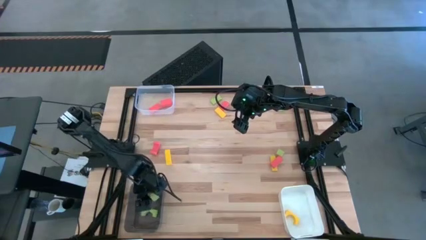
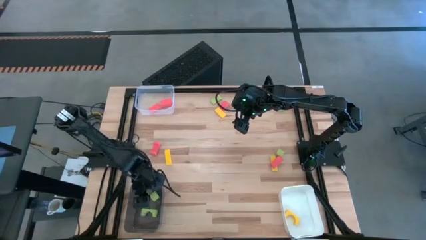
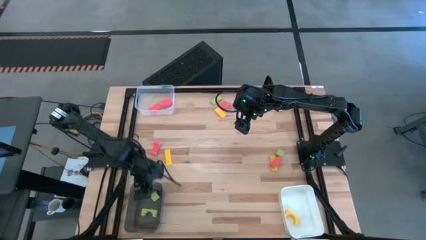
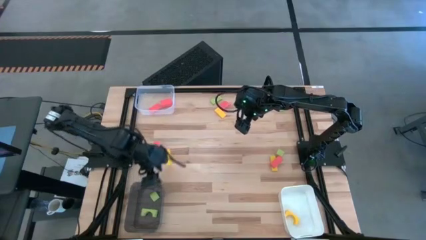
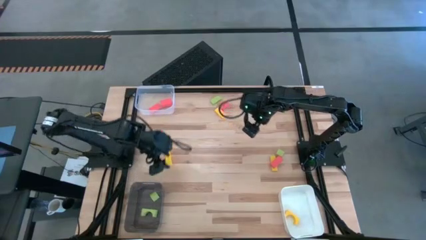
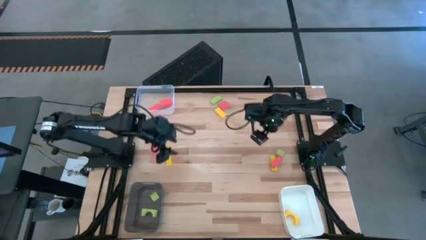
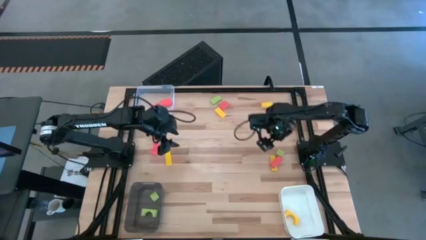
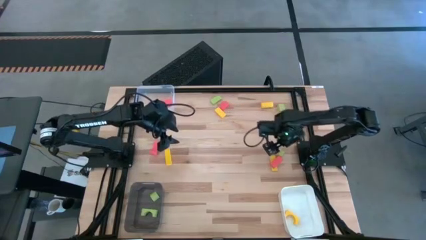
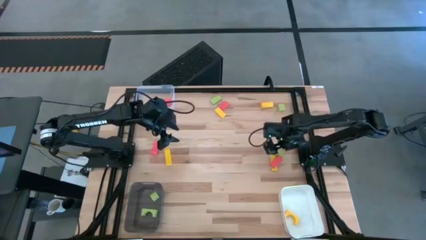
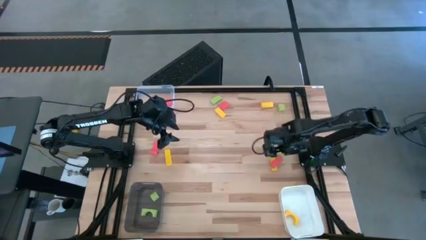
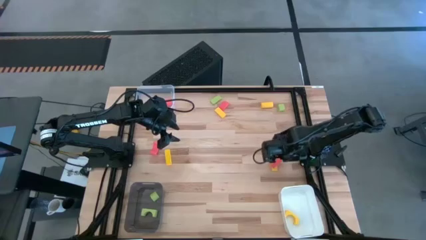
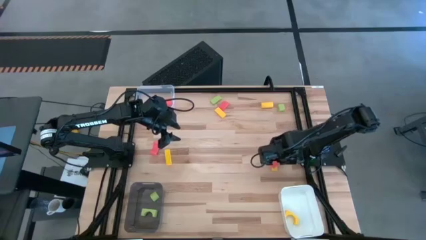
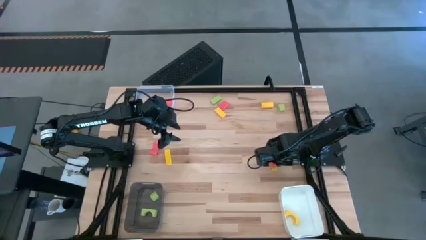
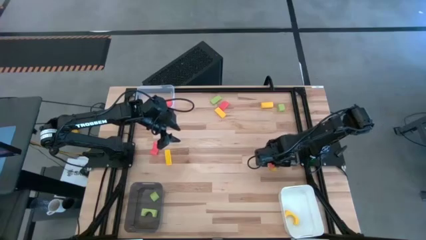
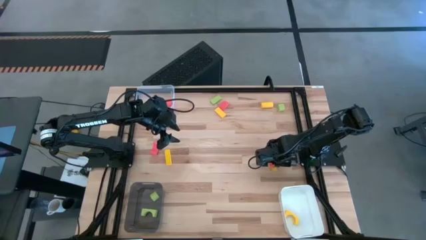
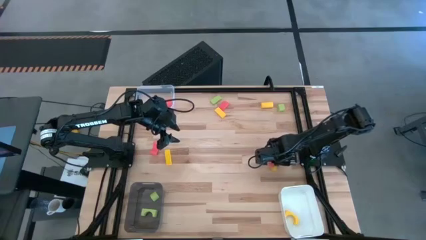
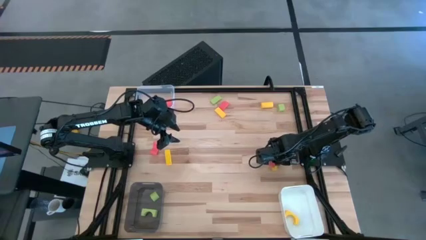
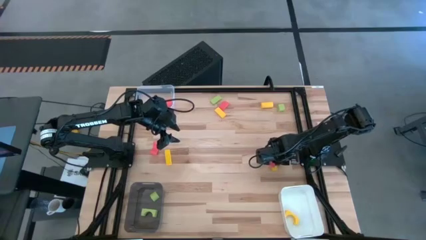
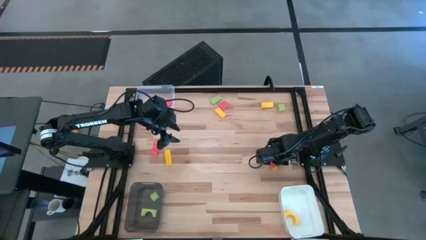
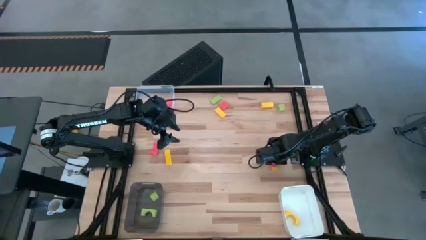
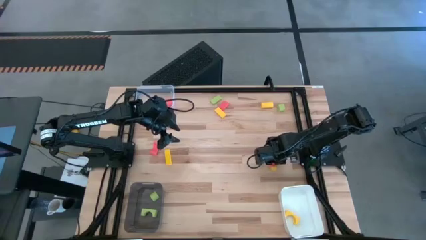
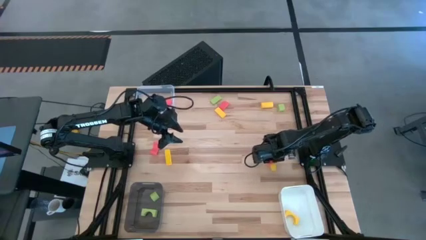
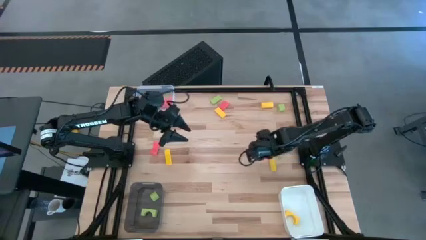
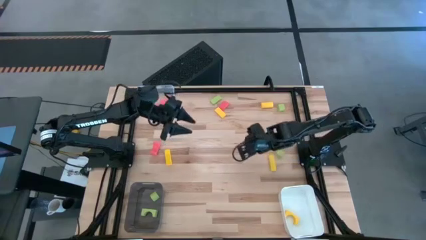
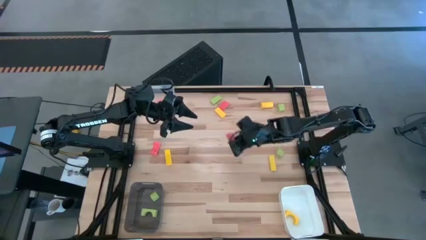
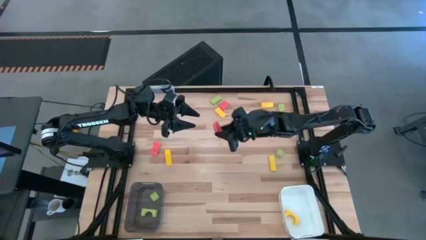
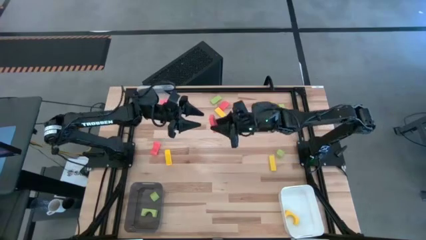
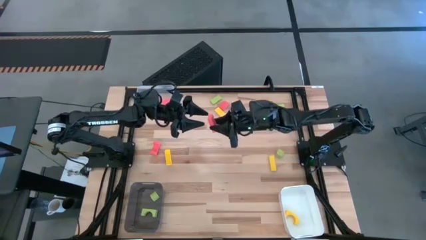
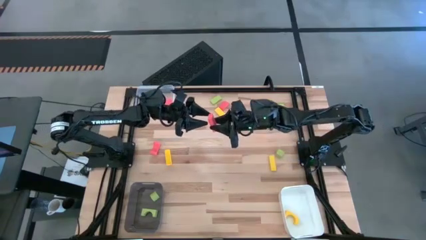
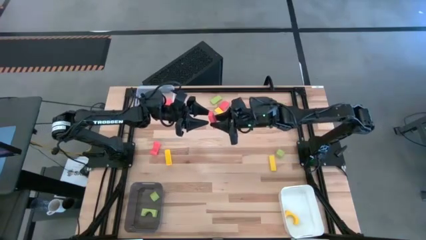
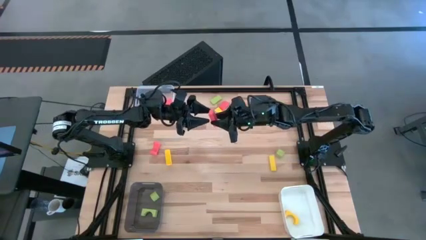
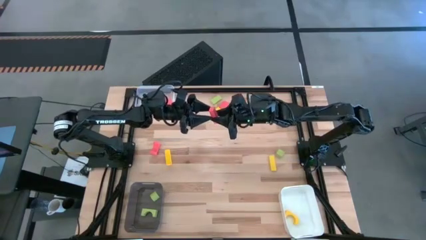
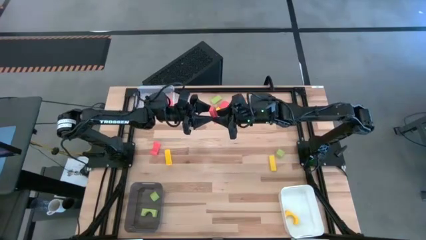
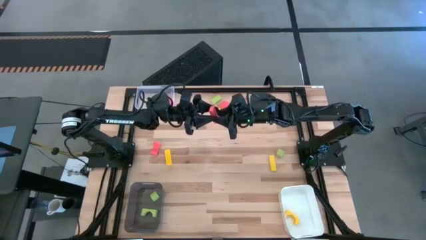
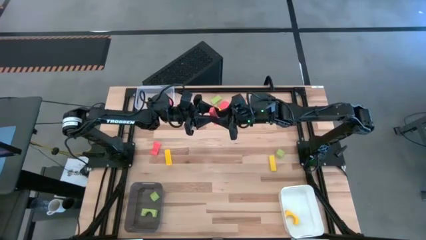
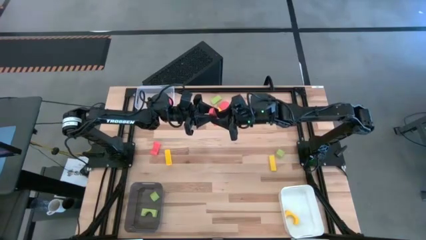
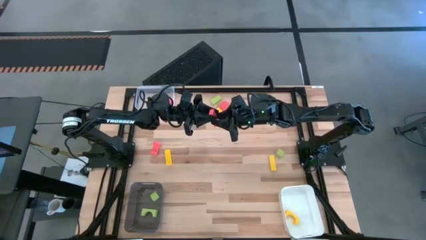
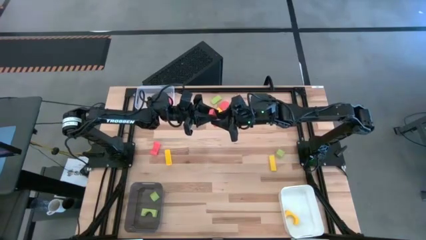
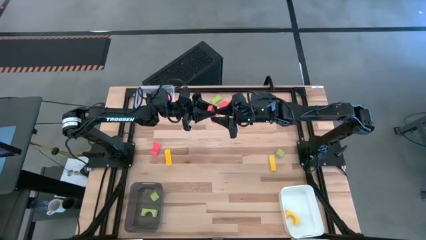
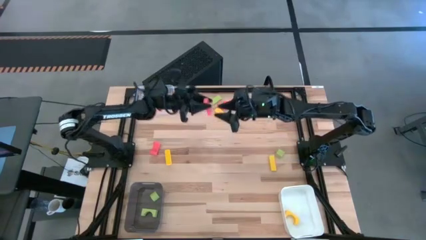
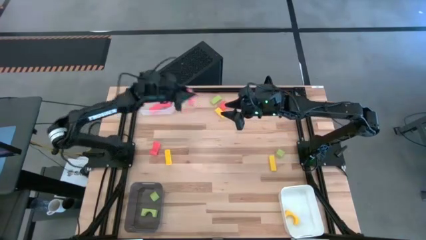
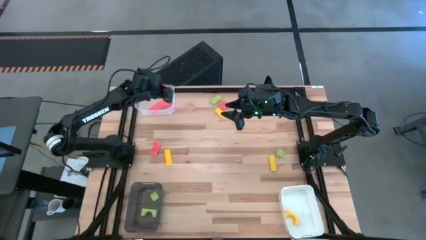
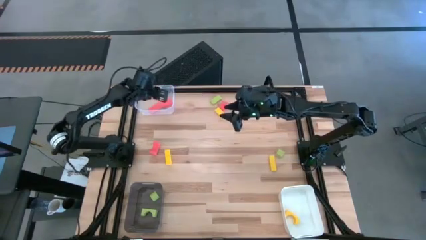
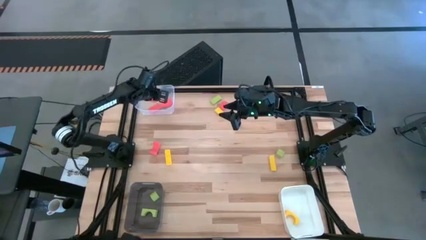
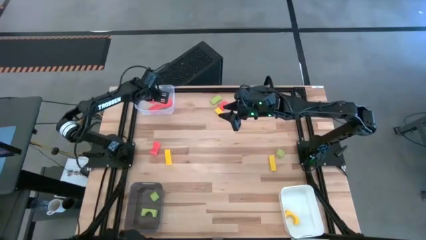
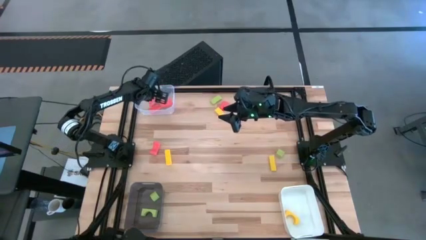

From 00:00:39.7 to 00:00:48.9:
Task: Sort & place blocks by color
Put the orange block into the white transparent bin

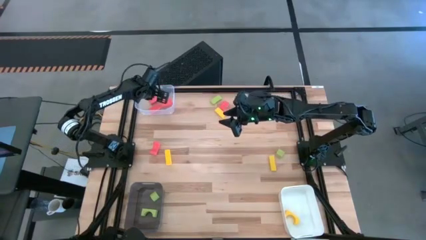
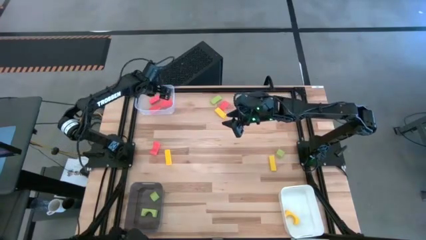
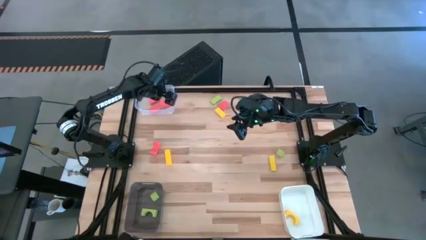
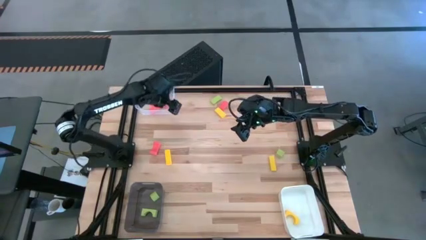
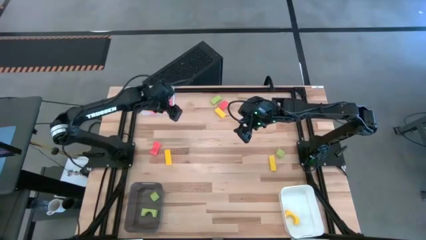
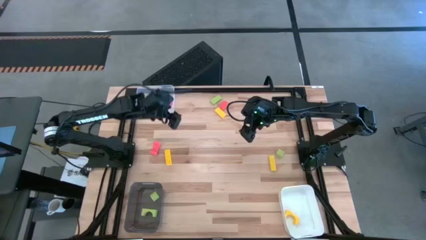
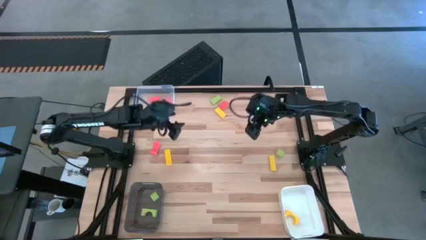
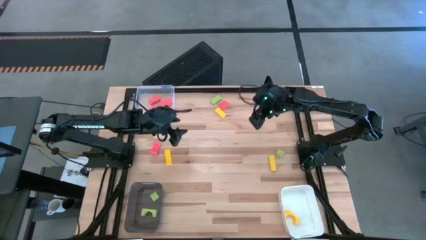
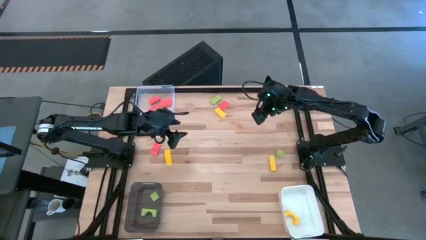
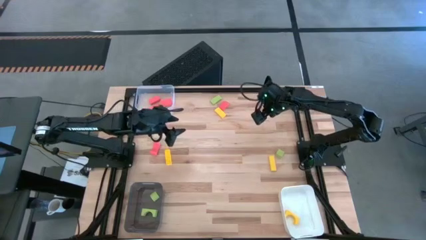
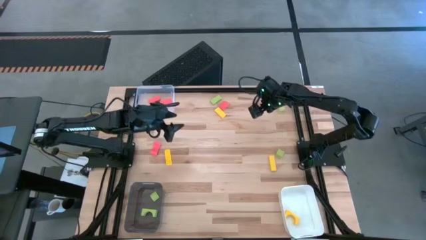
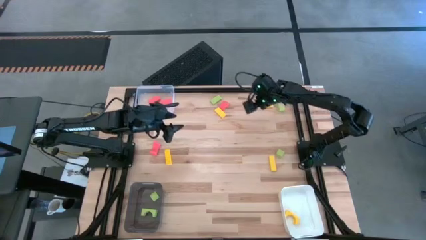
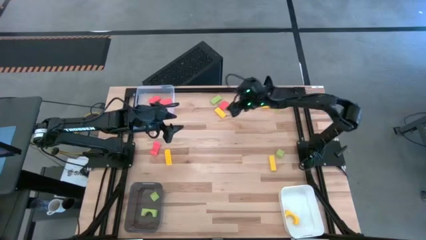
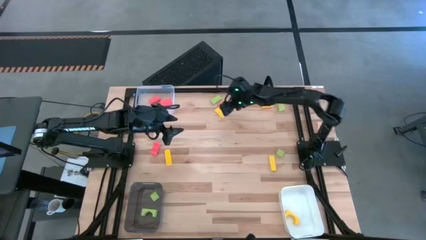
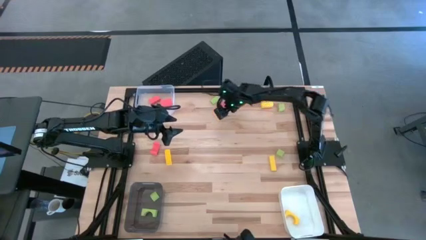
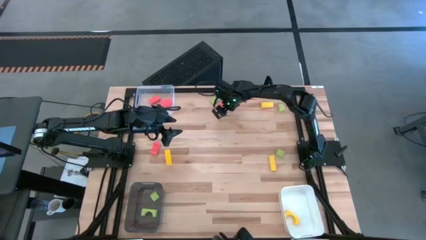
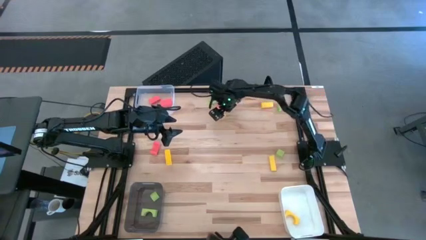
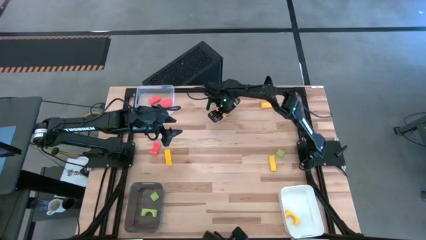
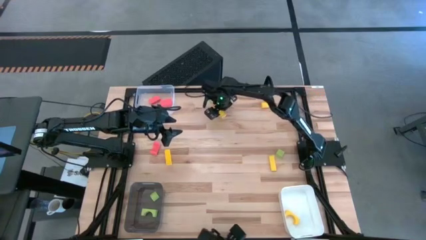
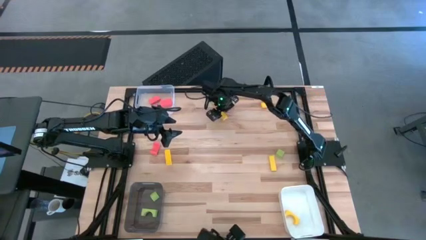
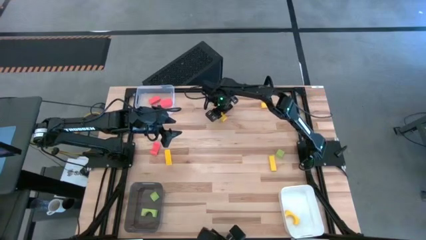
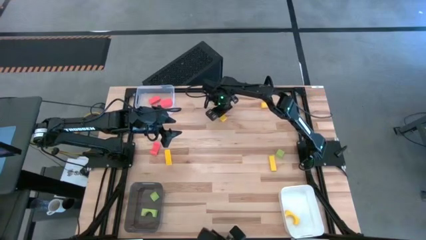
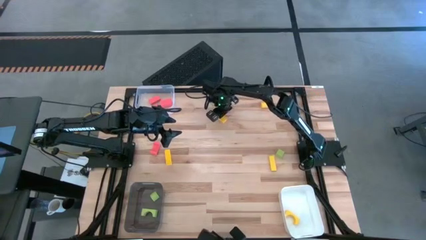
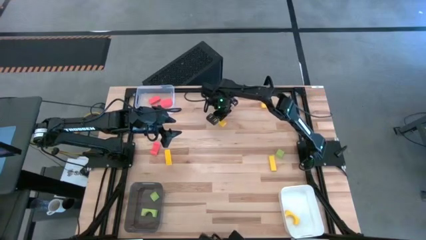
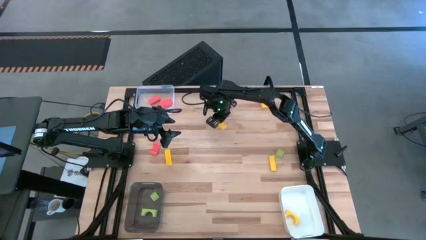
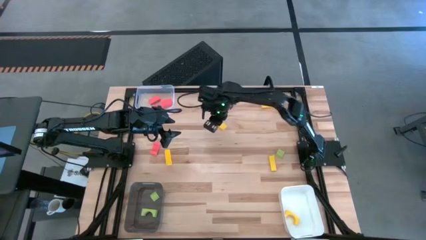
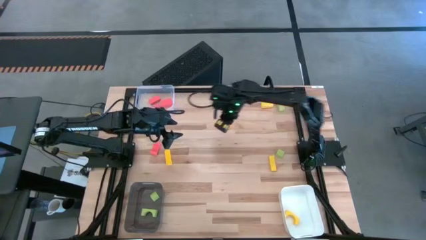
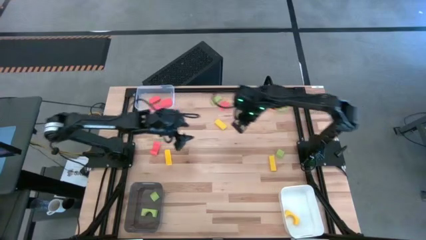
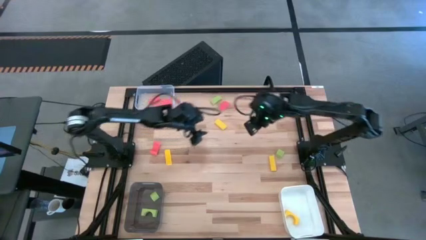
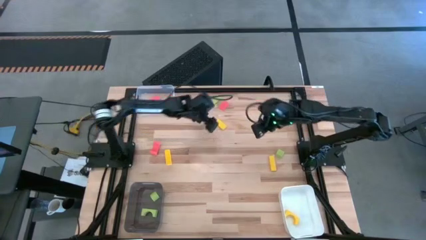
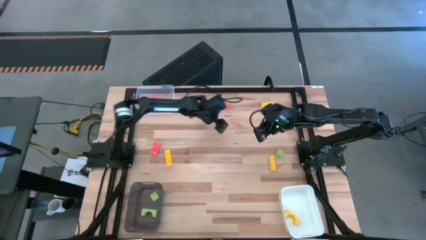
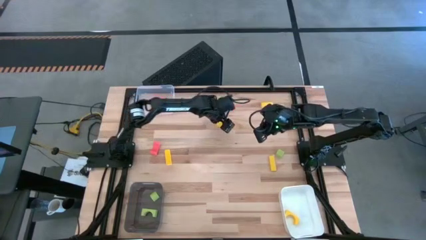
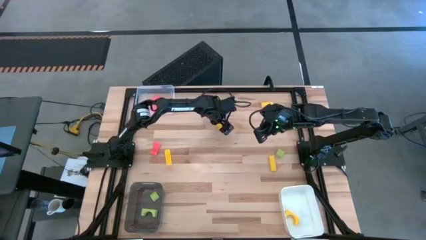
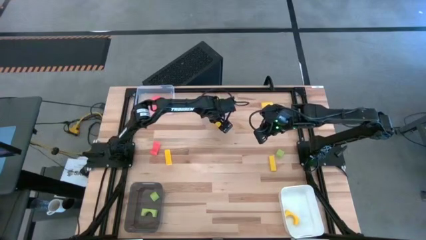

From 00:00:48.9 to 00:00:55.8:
Put the yellow block into the white bin
